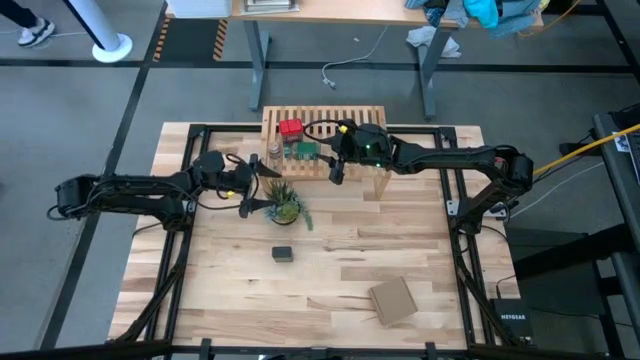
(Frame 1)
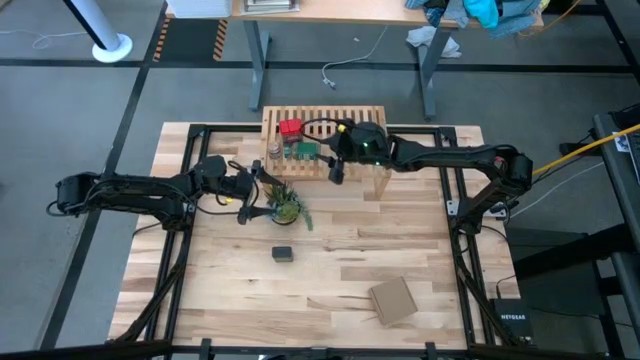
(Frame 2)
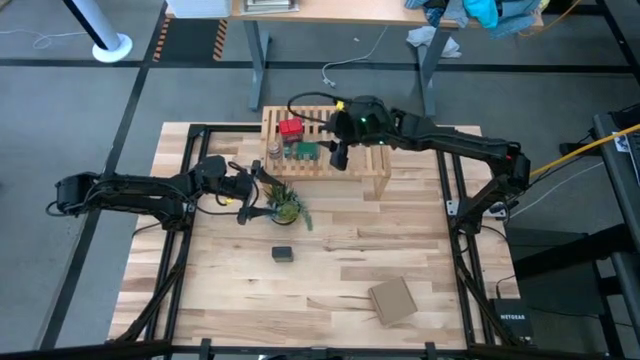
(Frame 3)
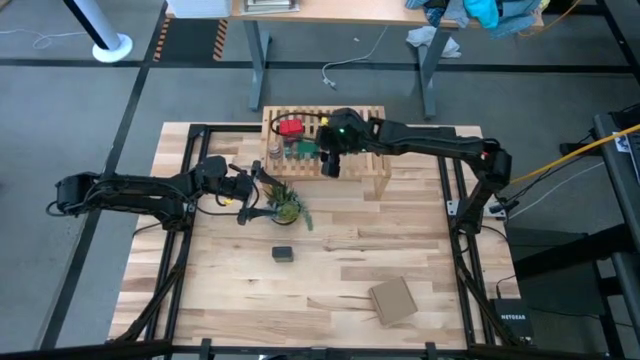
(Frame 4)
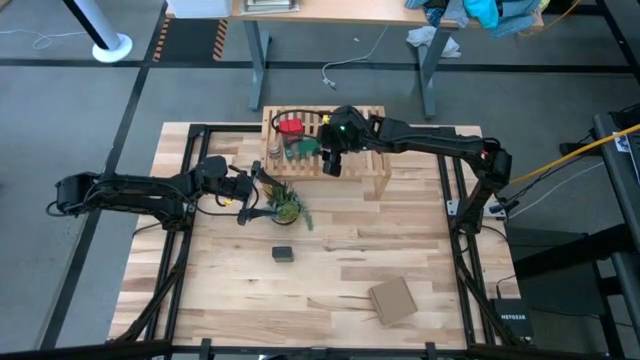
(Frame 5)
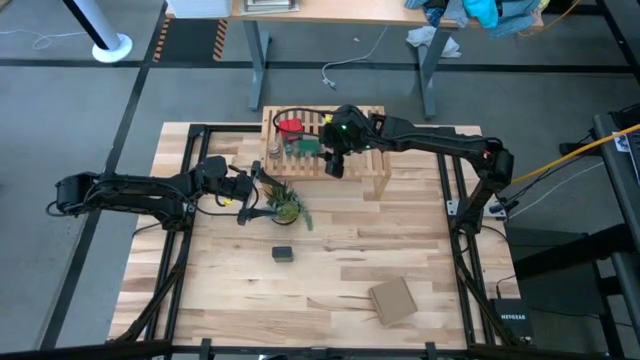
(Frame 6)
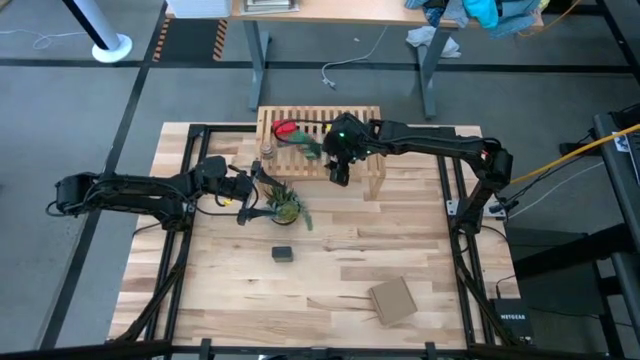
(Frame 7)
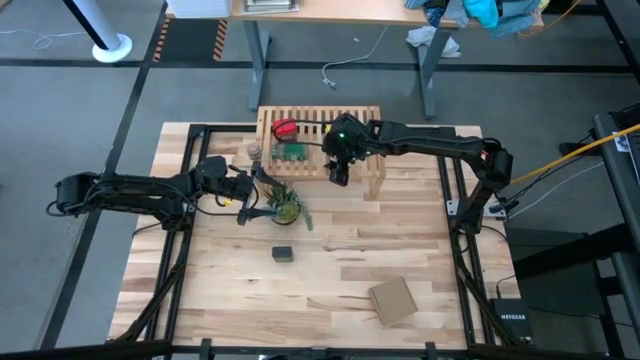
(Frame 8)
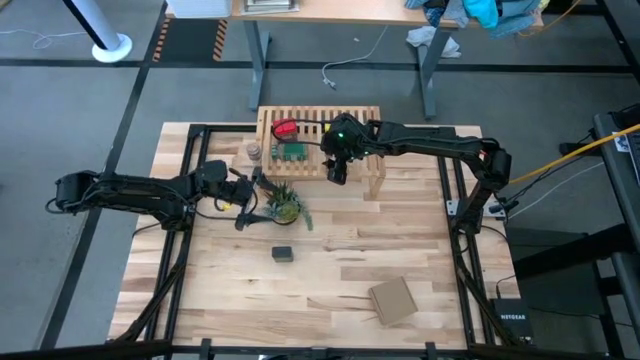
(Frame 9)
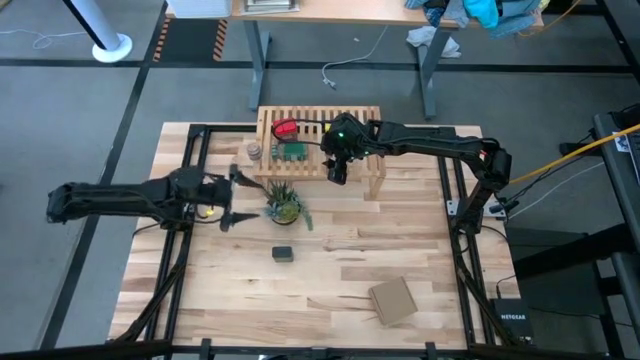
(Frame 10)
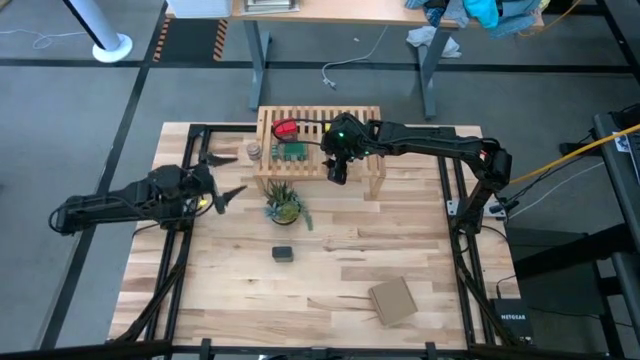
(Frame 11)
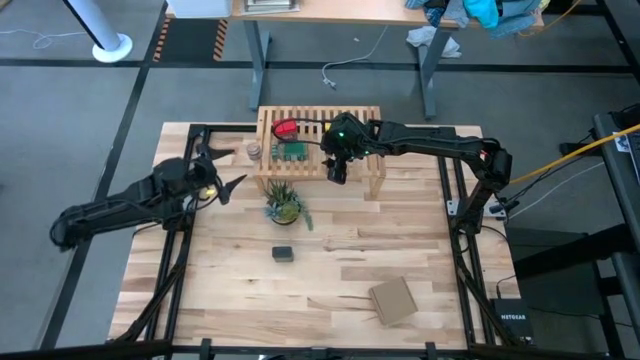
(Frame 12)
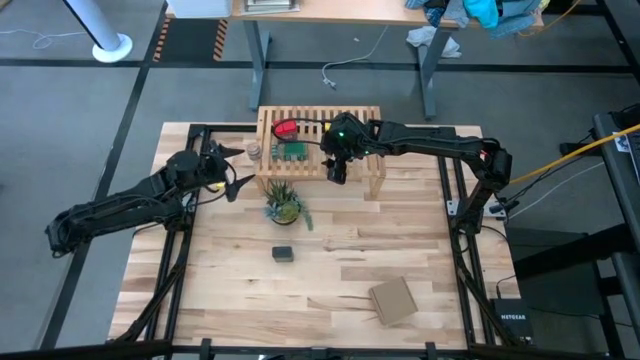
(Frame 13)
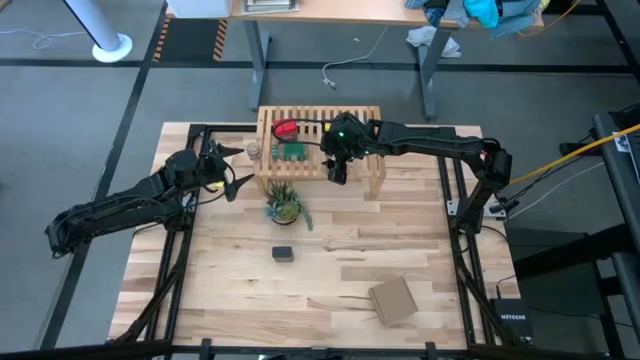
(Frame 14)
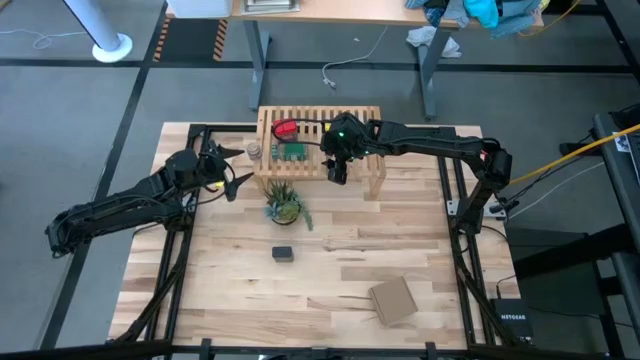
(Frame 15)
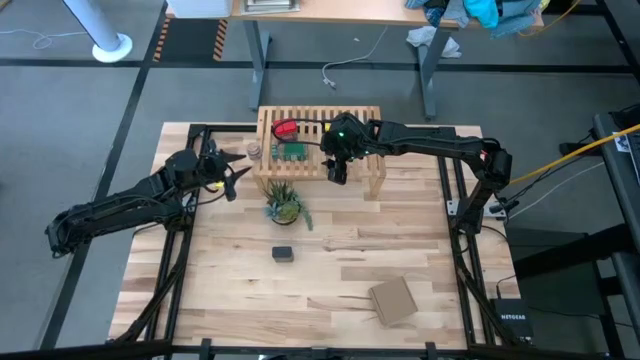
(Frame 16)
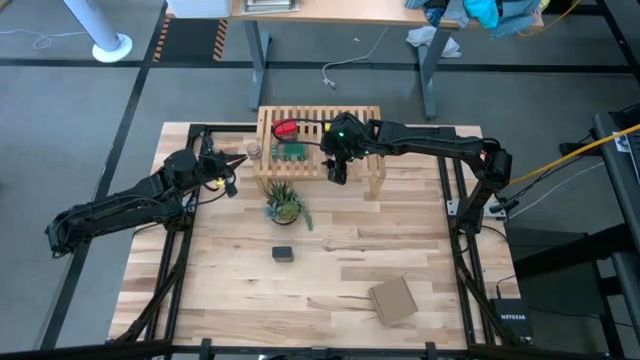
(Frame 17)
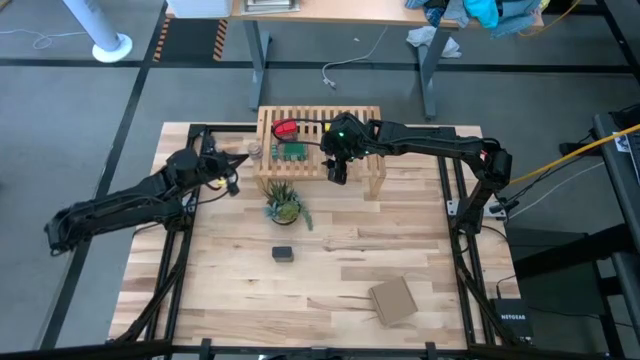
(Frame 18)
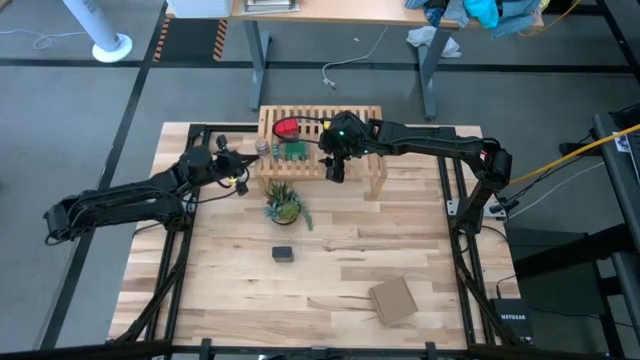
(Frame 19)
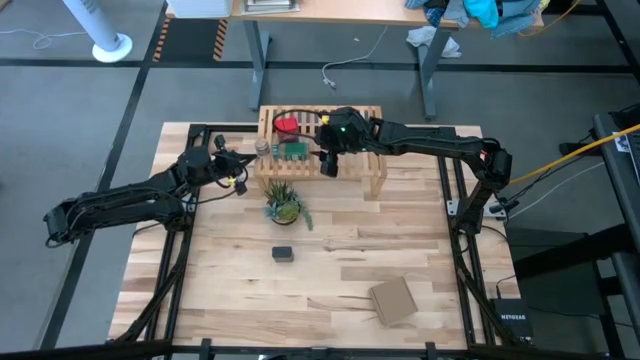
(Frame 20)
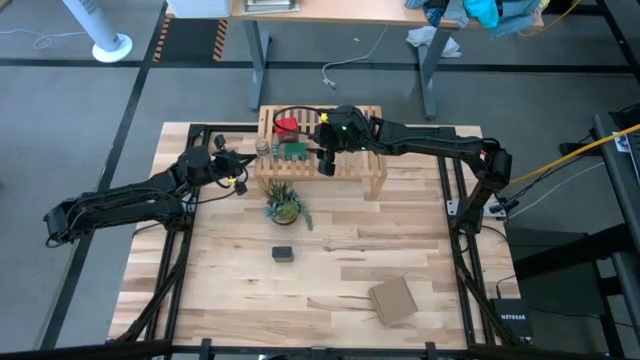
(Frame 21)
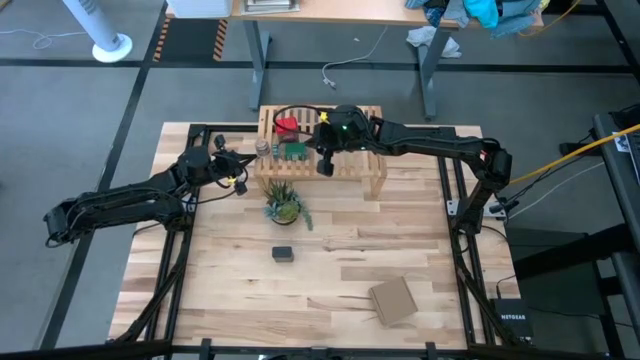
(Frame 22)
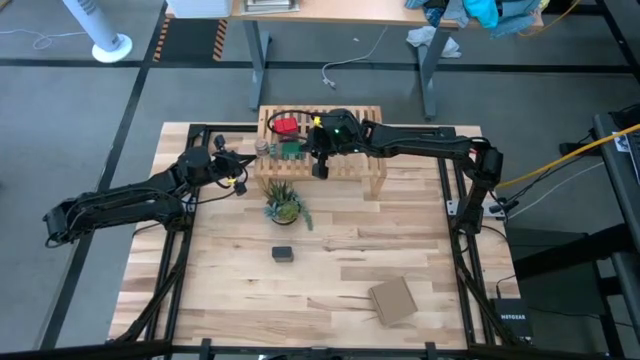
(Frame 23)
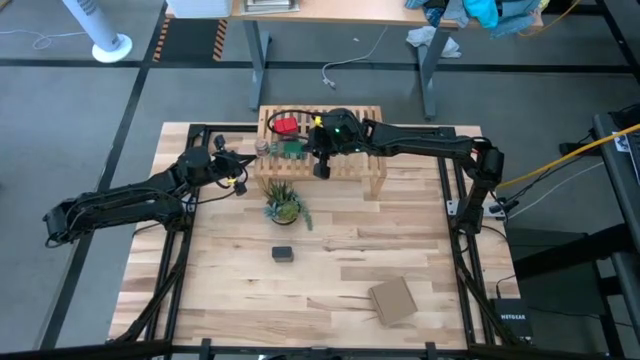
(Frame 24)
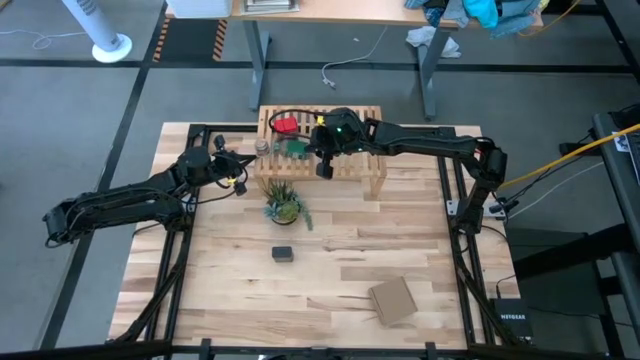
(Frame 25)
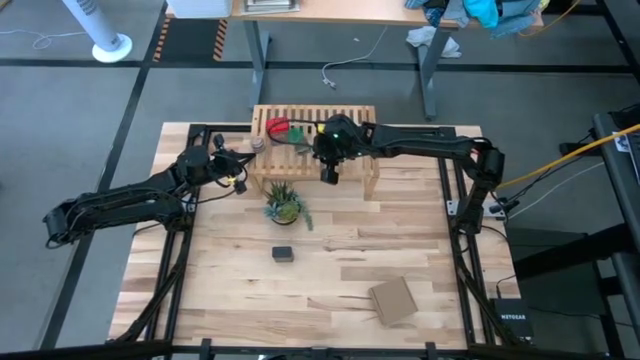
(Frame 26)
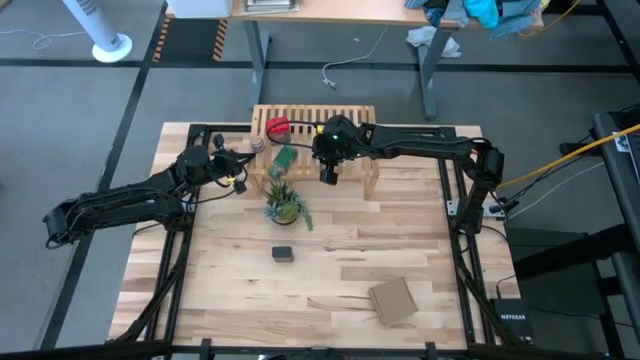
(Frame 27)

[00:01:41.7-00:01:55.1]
Task: Shelf spices
Put the green seasoning bottle on the shelf

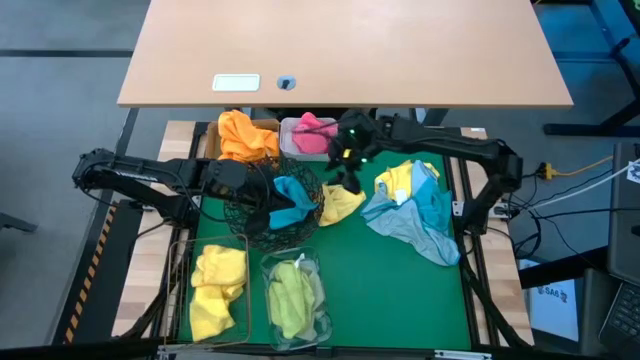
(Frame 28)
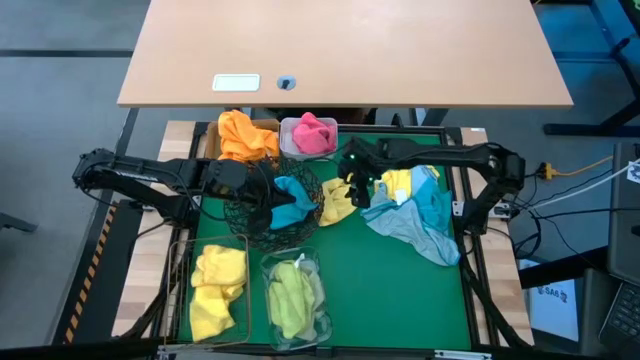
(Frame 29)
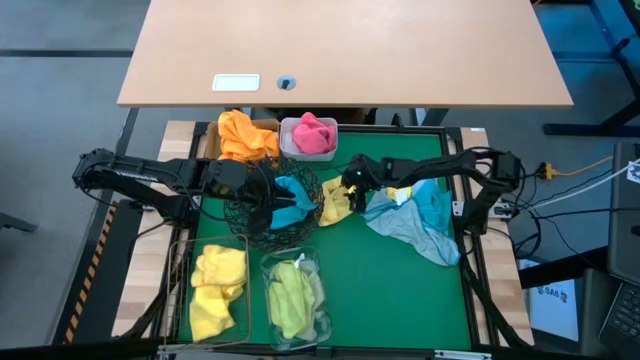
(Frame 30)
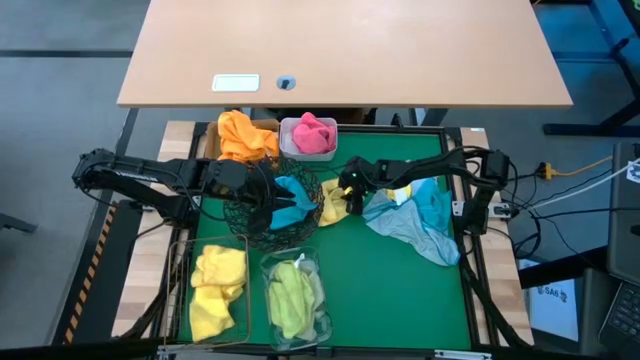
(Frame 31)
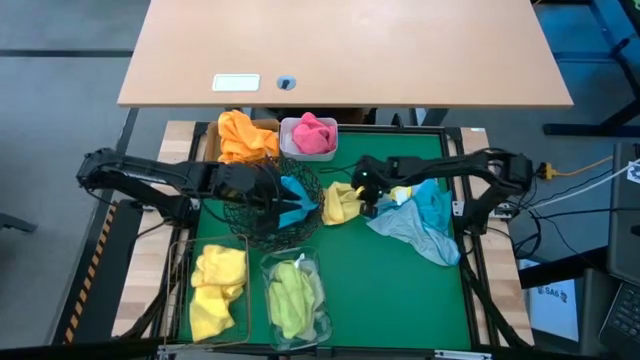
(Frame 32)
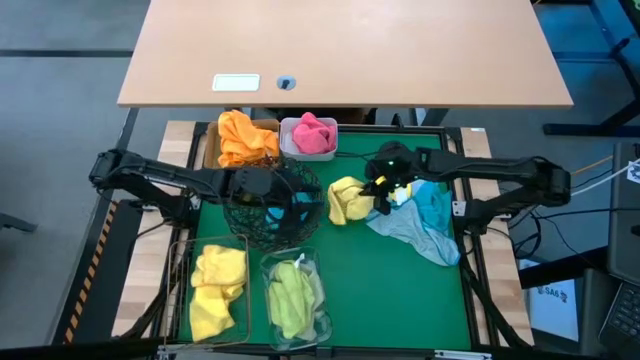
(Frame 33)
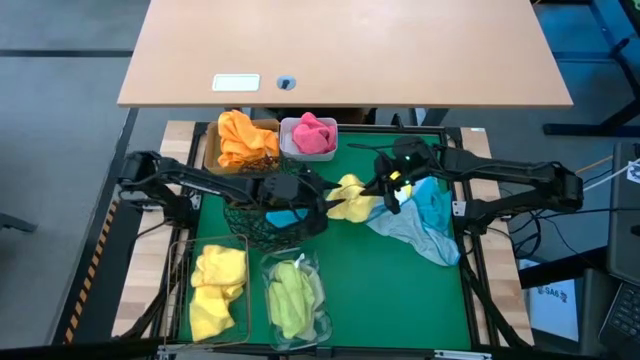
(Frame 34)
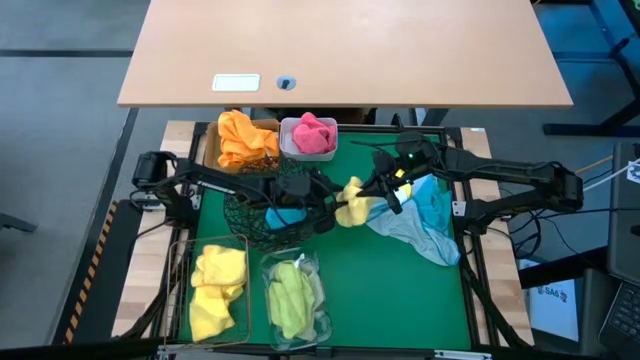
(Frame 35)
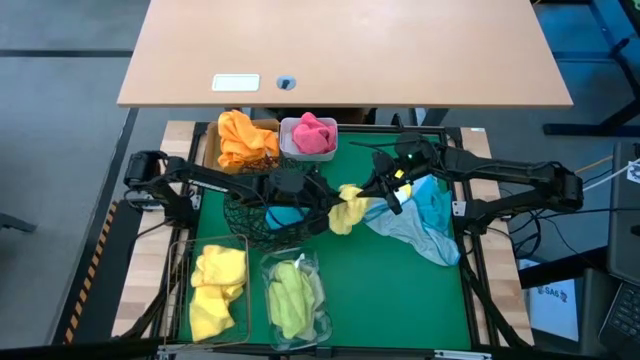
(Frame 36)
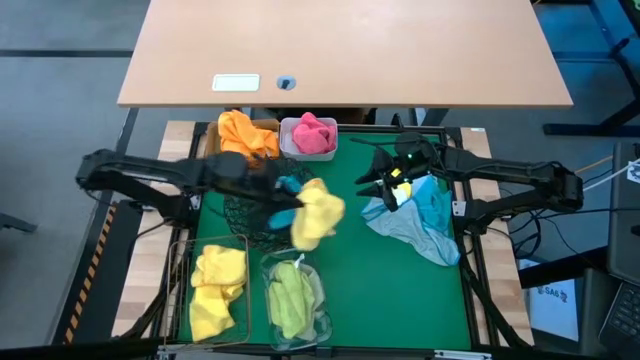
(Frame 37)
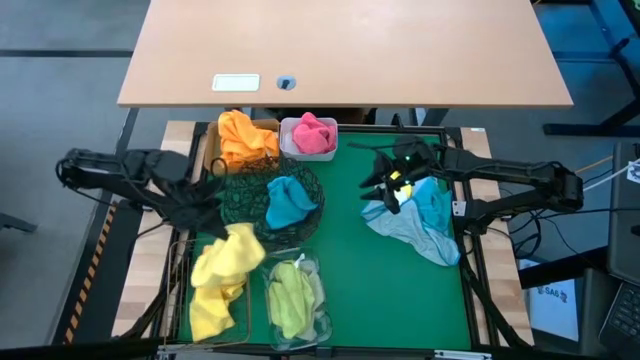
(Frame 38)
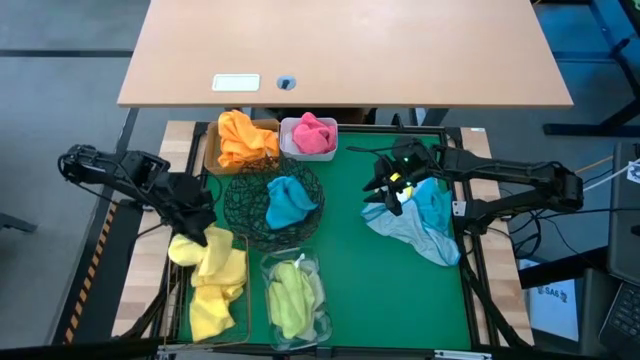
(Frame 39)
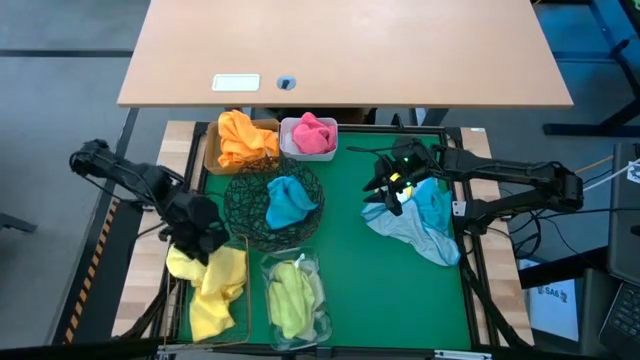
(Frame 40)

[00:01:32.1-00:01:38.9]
Task: Sort microfiber towel by color & place in baskets
Put the yellow microfiber towel into the wire basket

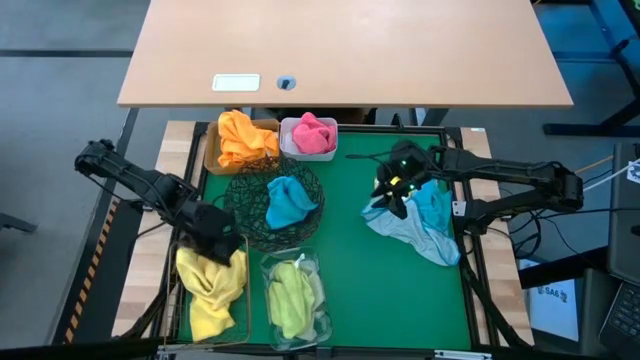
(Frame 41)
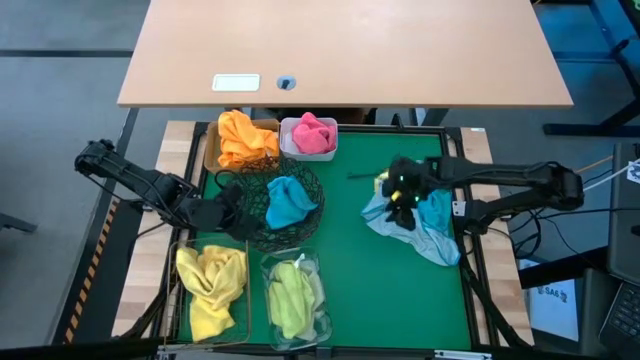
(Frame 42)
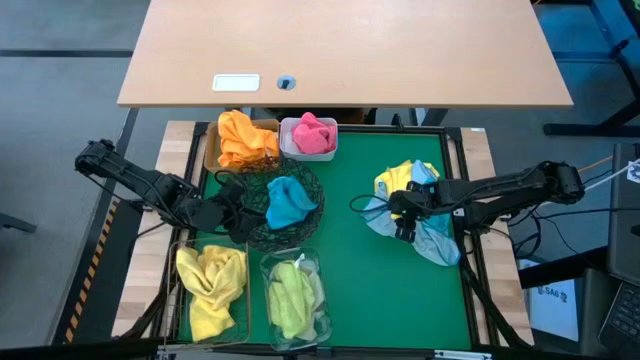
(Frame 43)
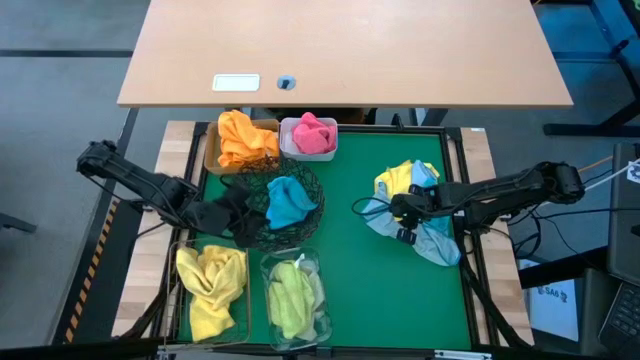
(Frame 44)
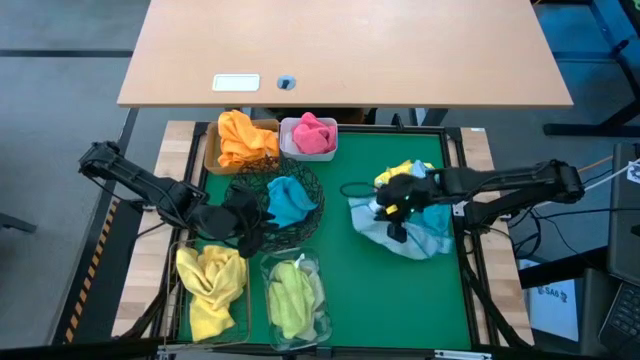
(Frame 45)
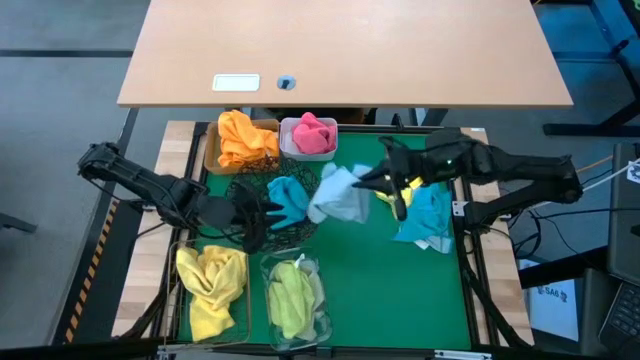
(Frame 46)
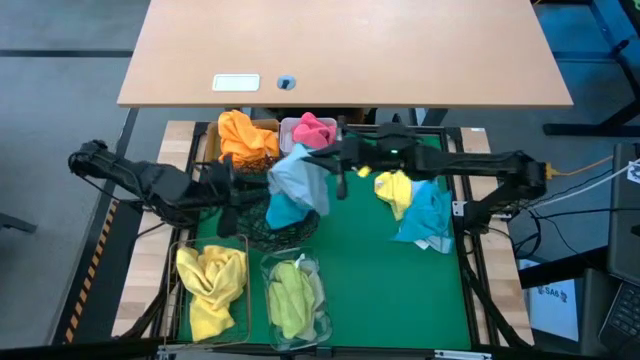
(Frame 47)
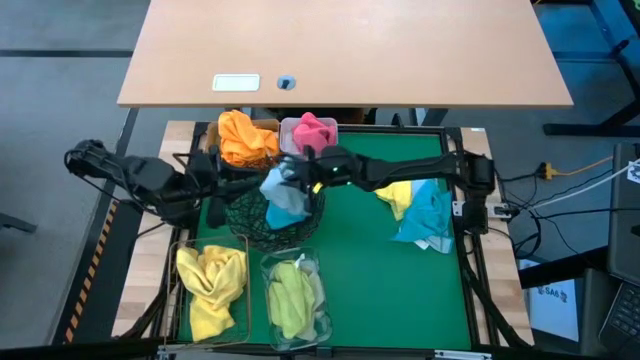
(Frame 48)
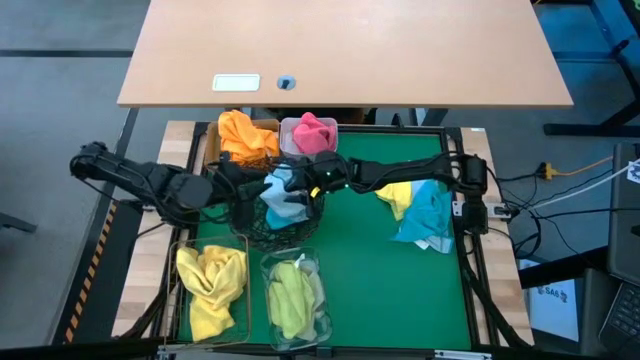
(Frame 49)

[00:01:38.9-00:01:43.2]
Put the light blue microfiber towel into the mesh basket
